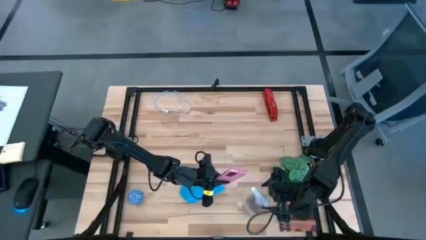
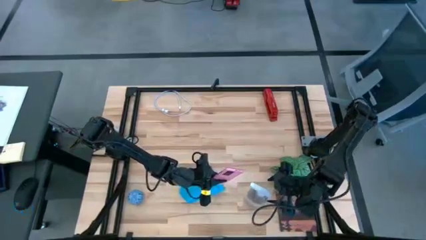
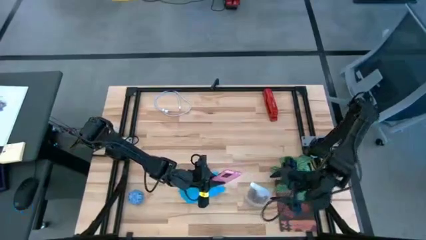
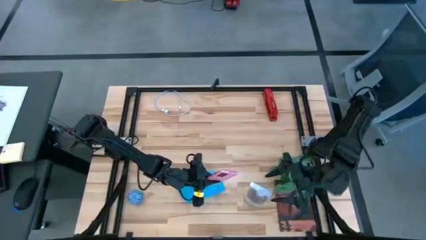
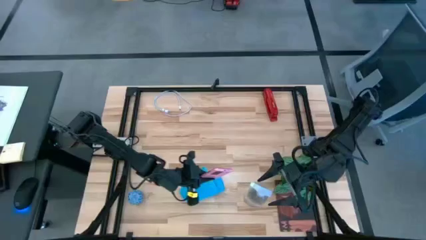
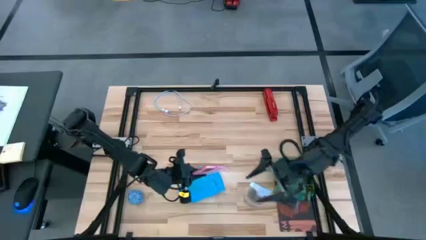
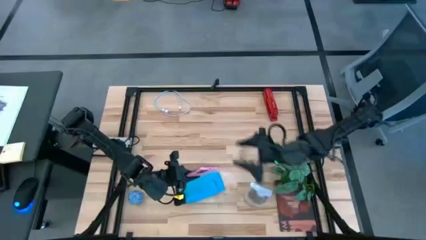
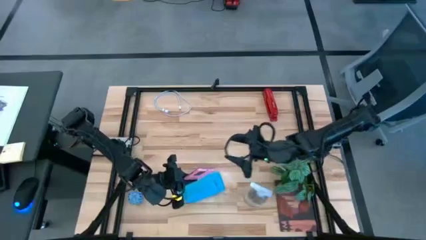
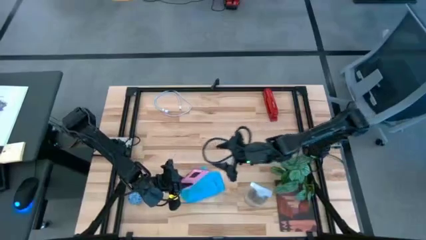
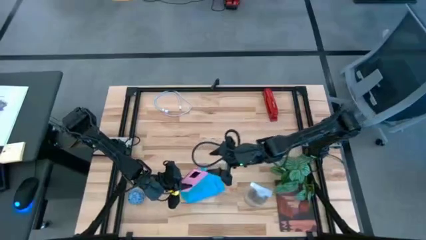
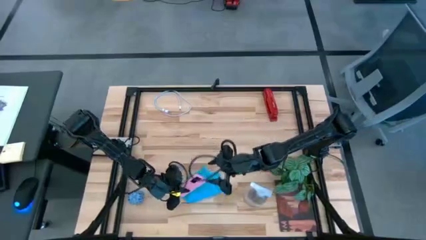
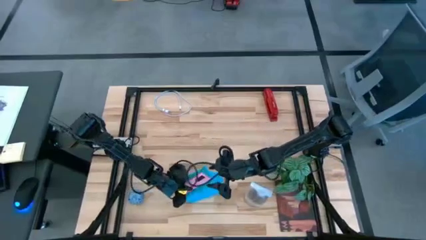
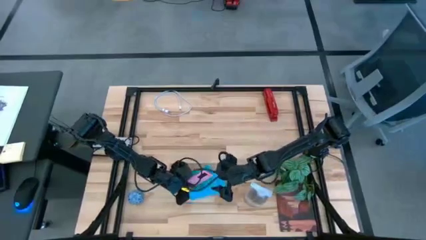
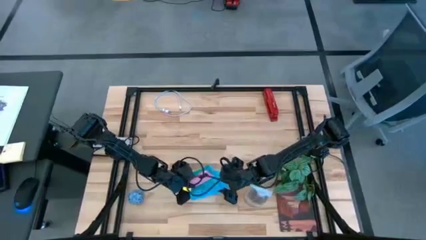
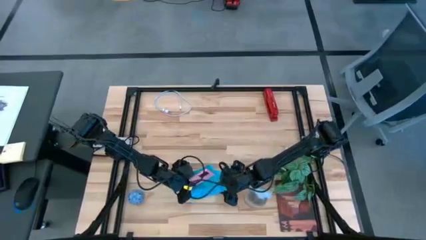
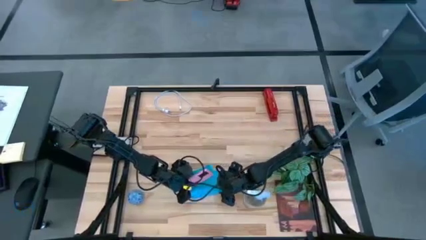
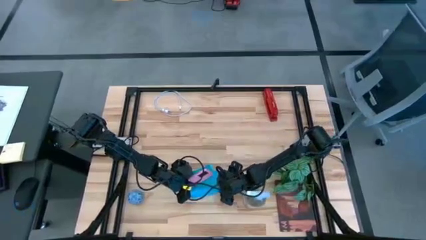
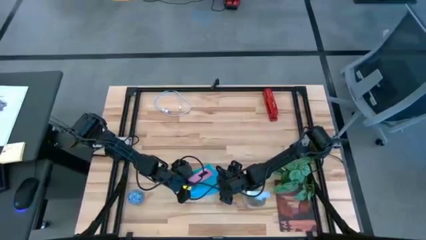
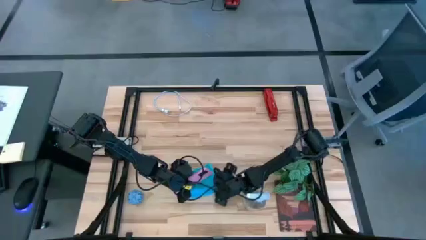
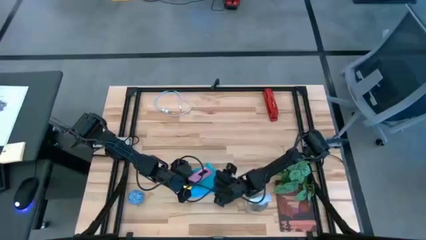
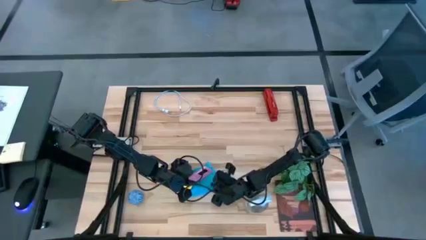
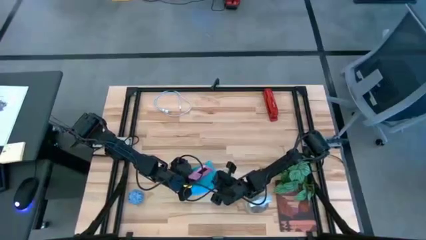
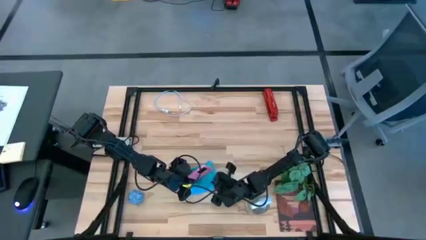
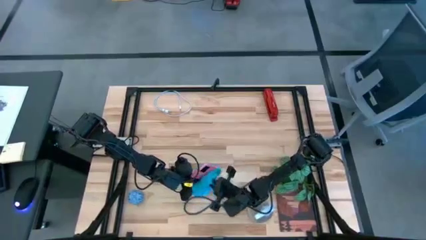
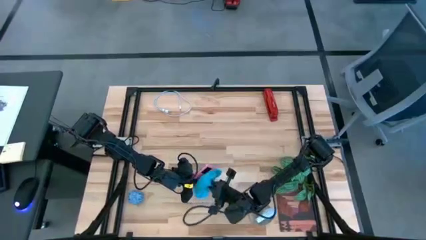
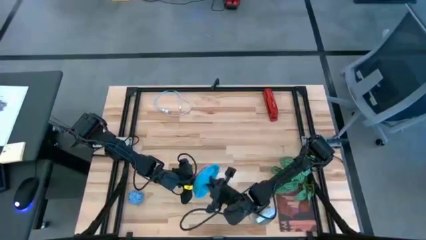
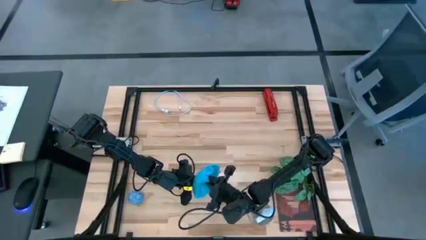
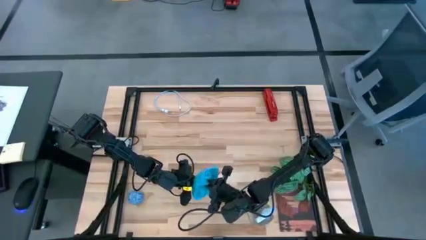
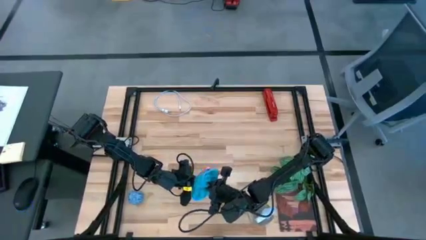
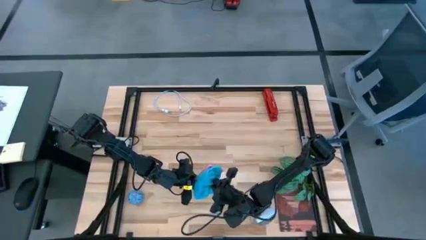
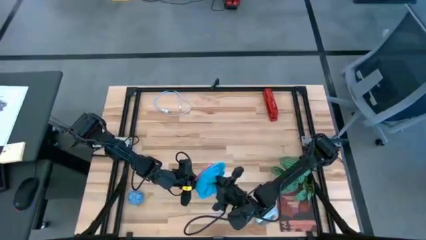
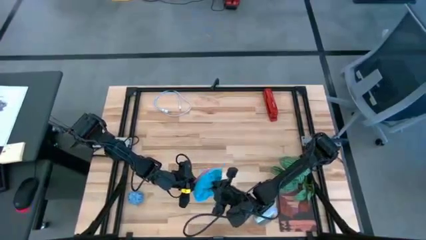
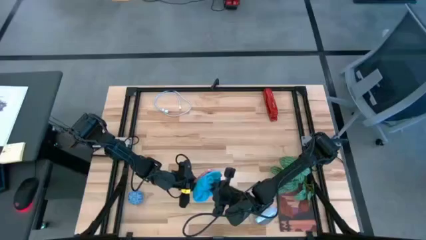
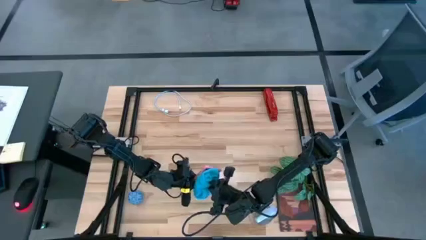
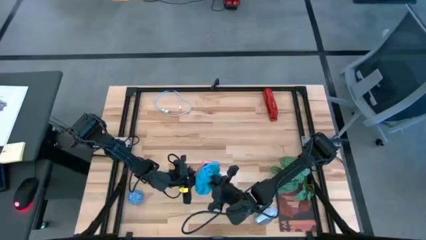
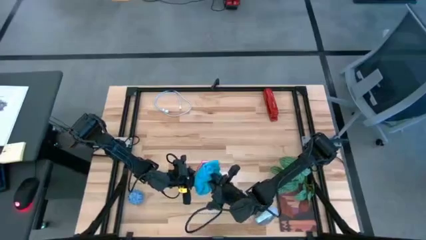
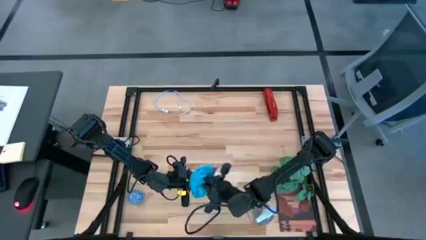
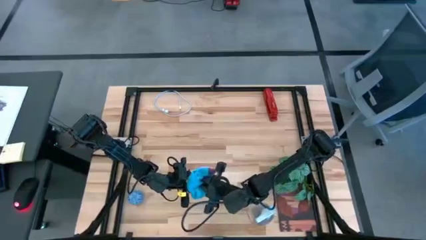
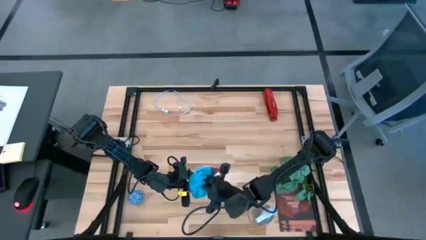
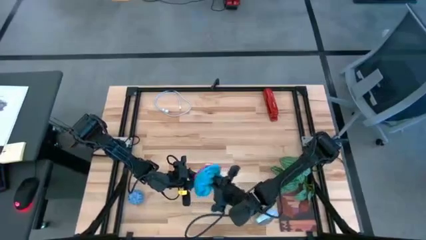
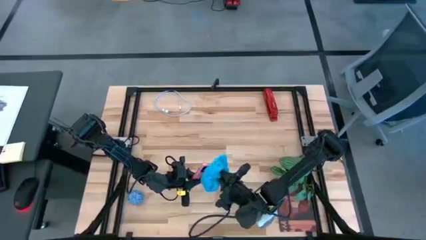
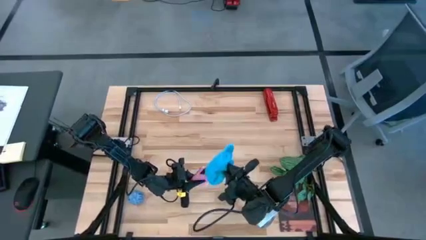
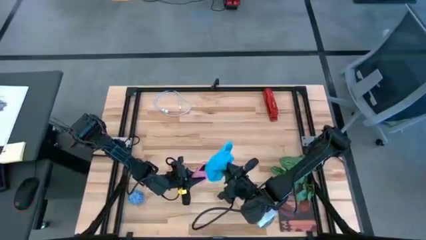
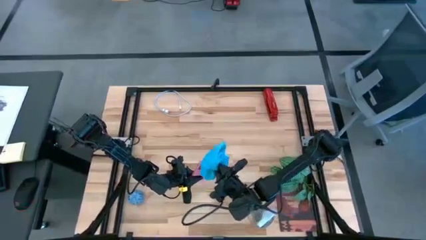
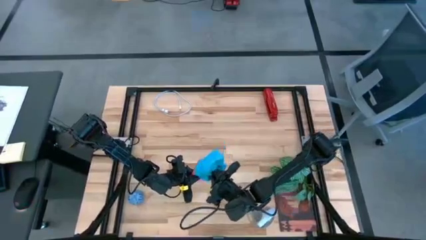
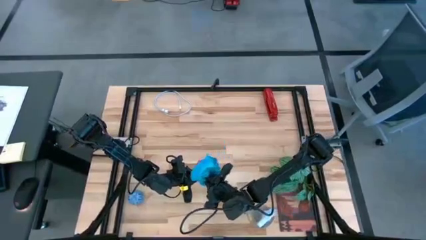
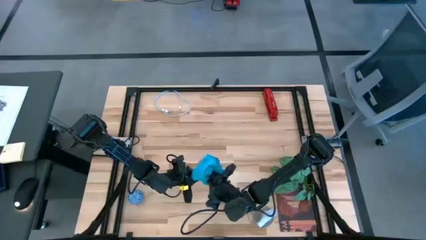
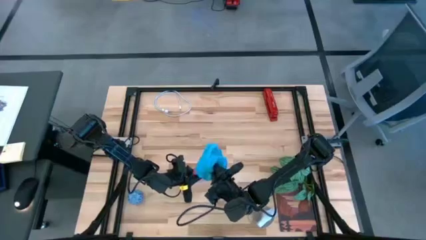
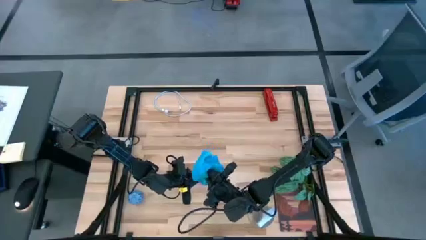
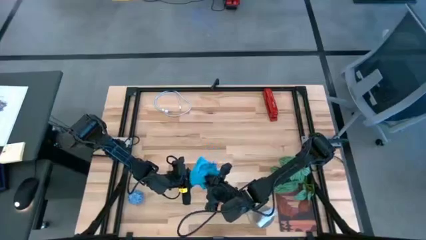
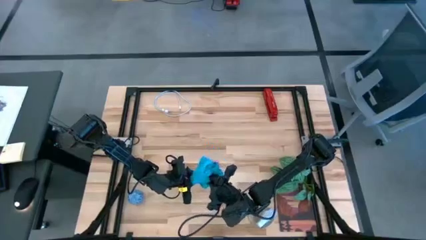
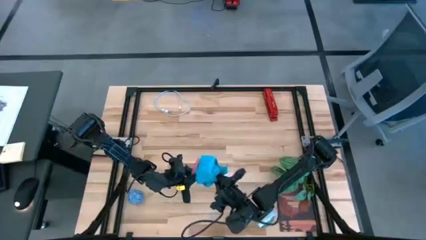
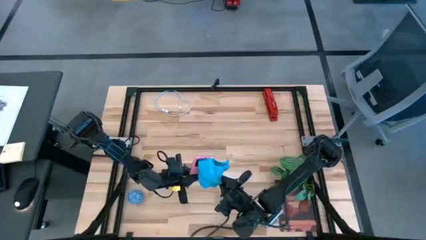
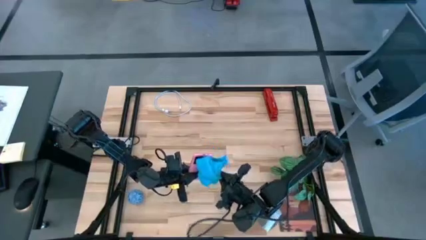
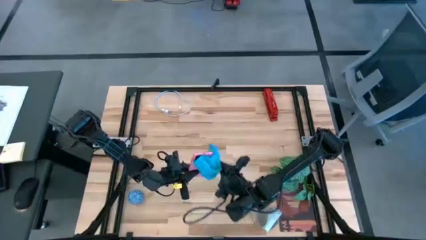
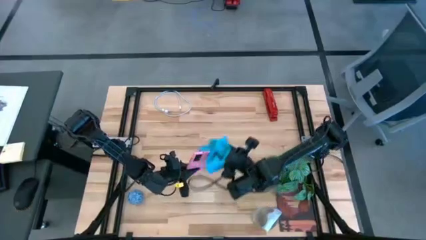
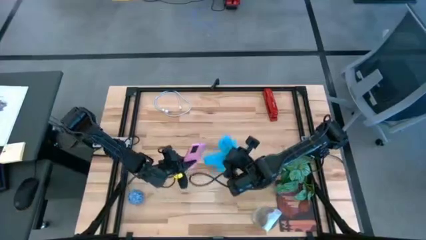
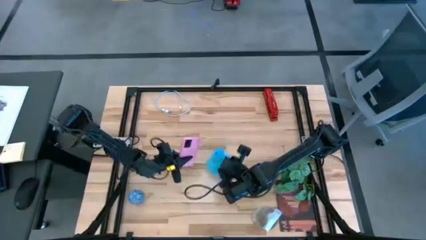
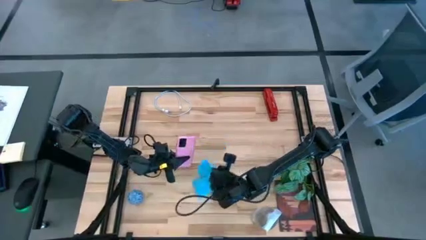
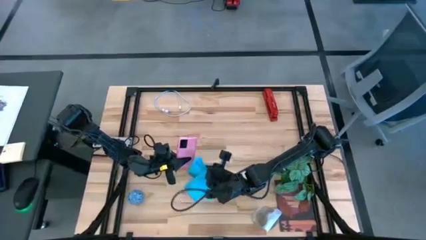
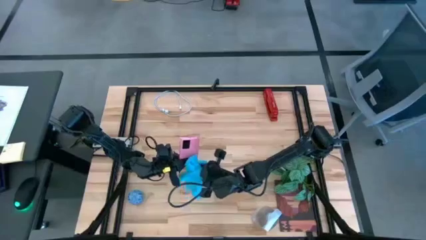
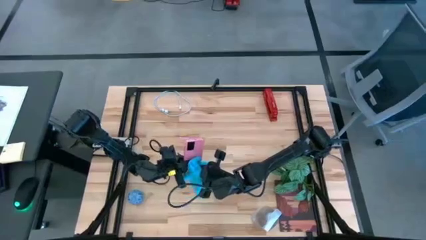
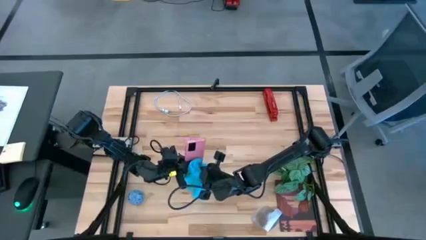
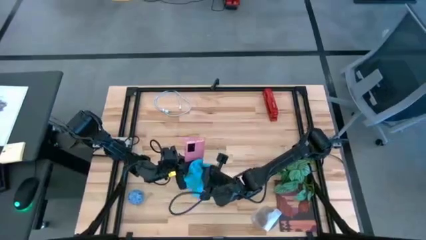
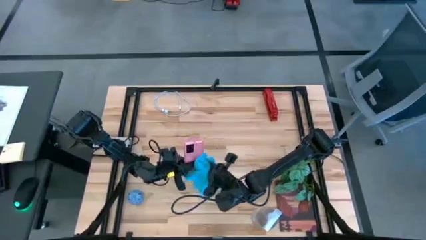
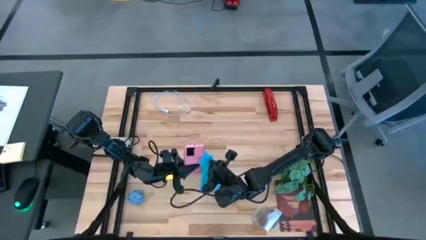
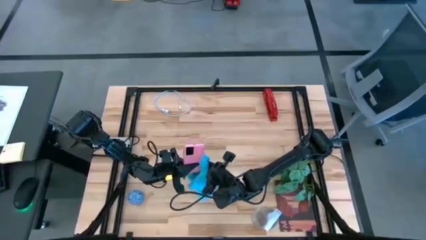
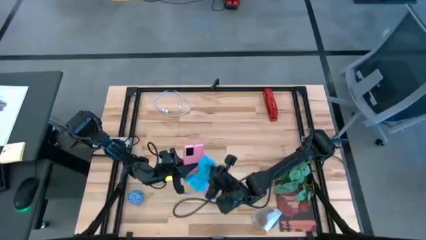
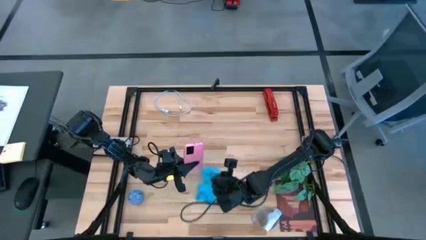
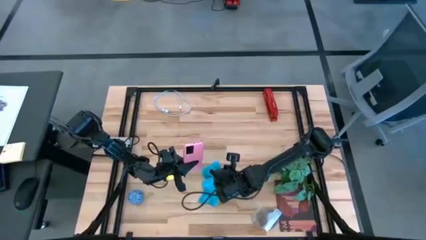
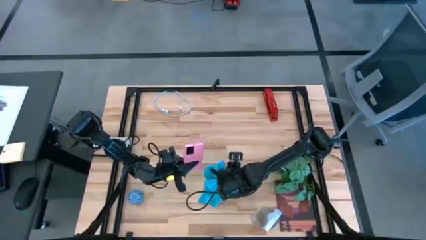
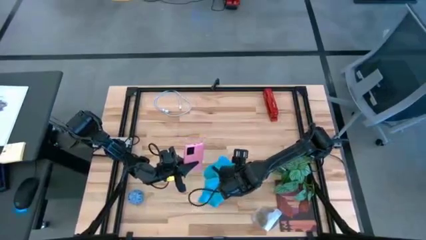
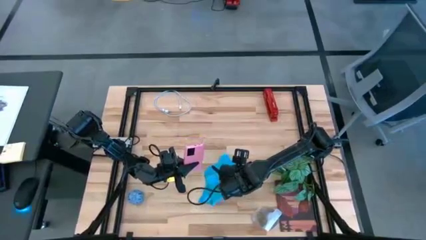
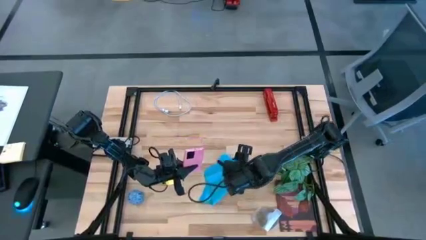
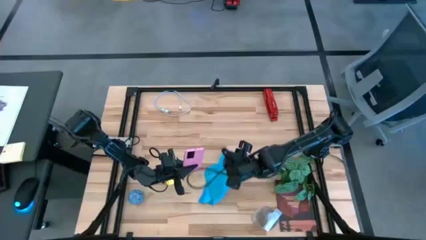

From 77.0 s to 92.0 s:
Task: Apply microfiber cloth
Wipe the back and front of the cellphone with the blue microfiber cloth
